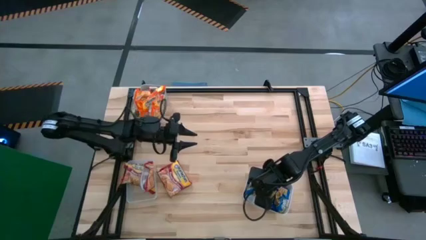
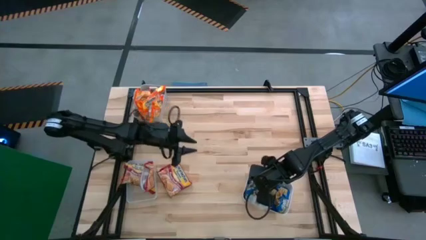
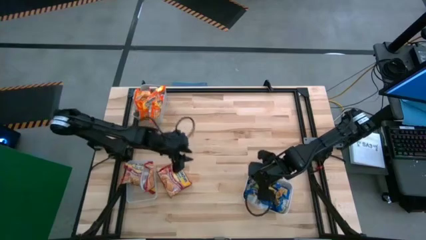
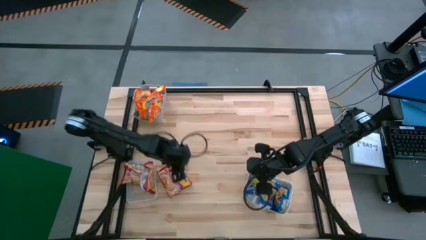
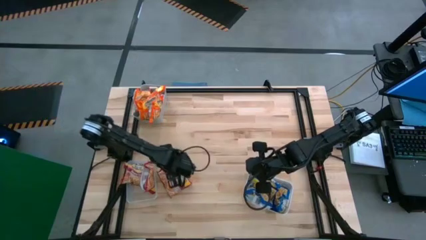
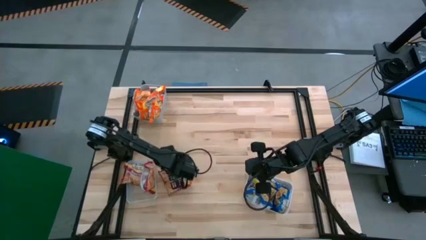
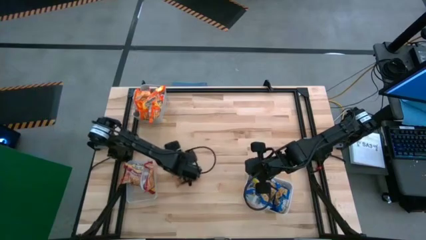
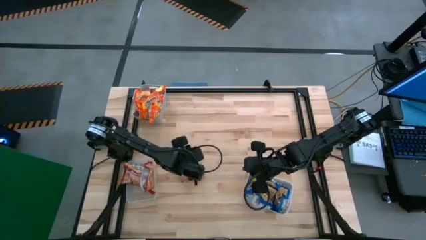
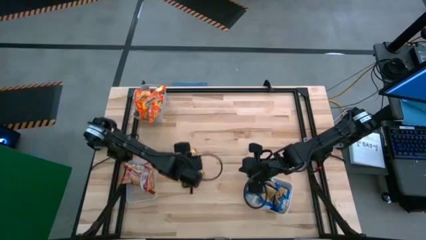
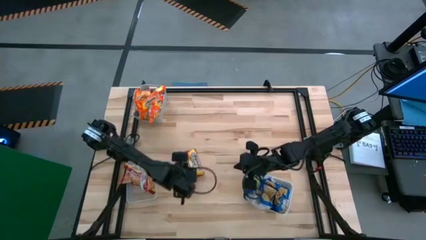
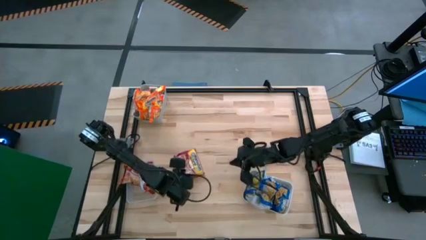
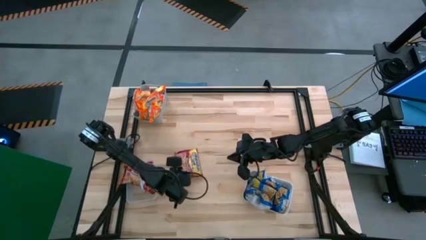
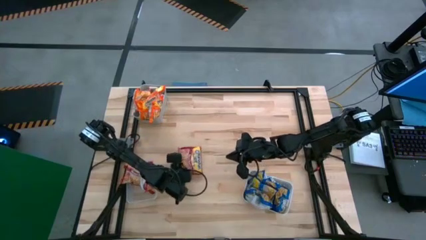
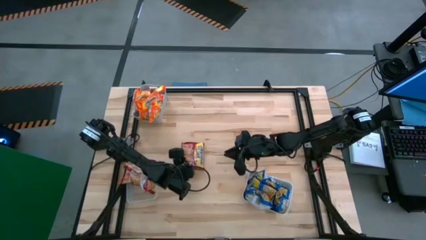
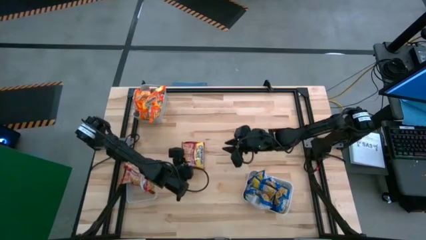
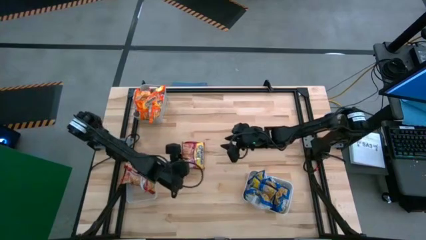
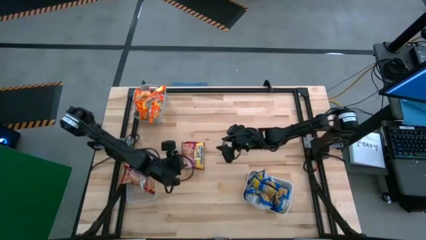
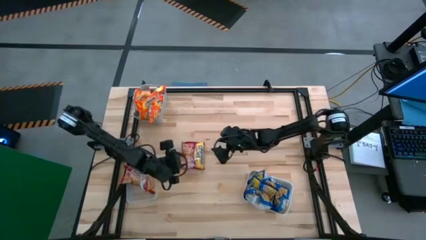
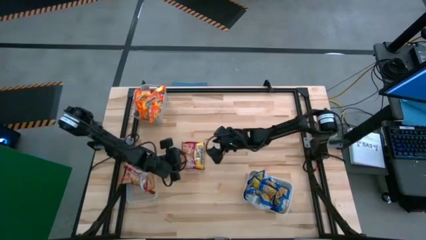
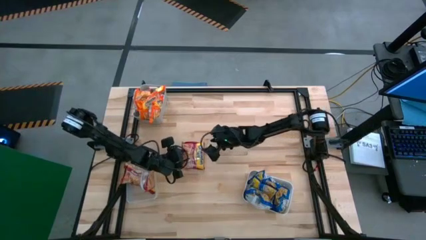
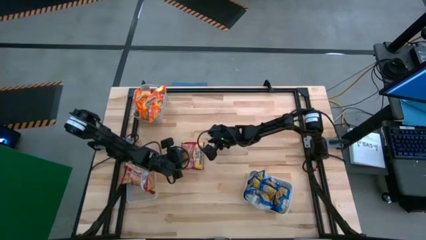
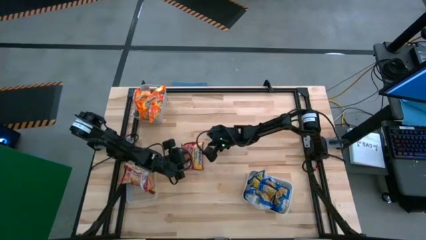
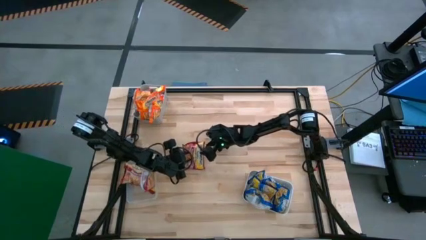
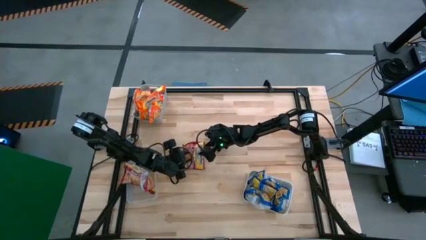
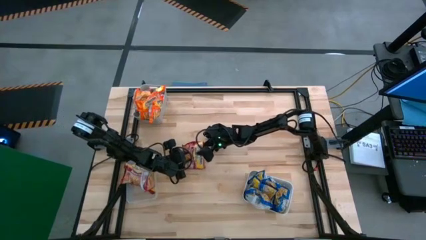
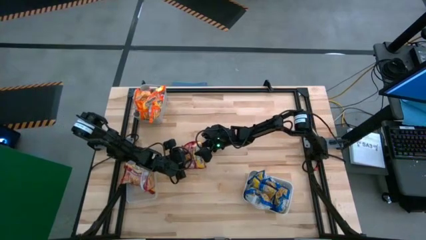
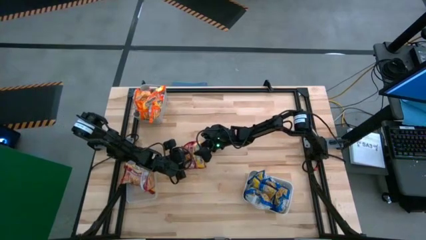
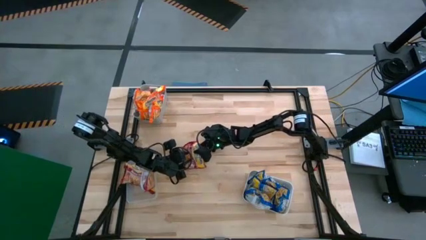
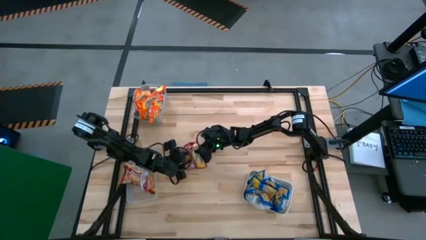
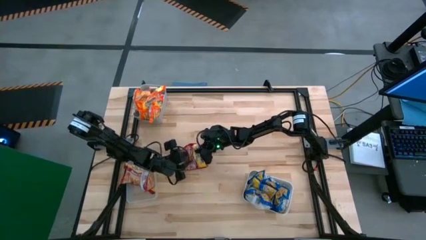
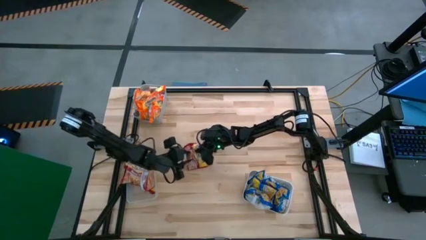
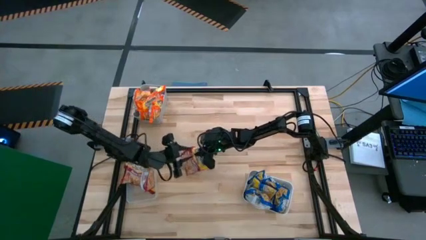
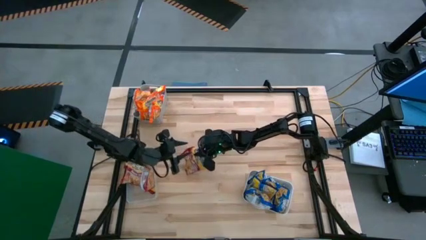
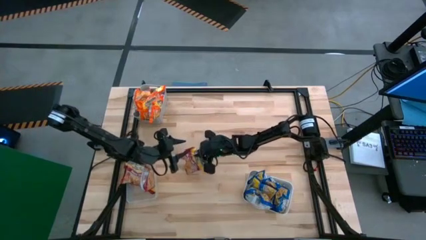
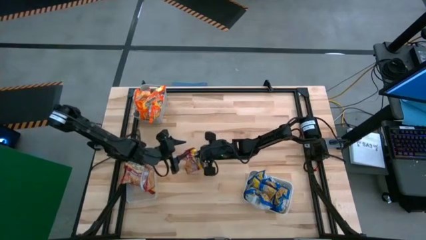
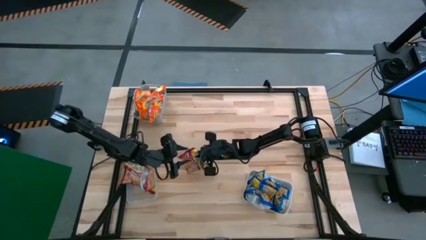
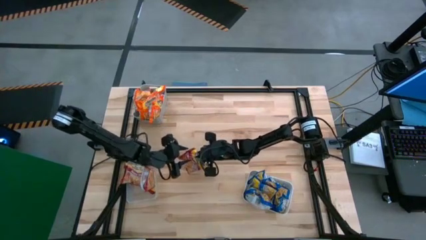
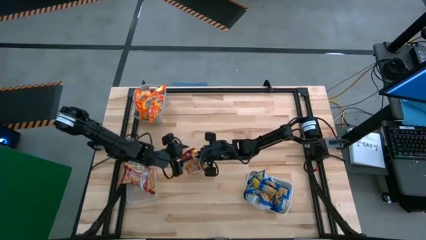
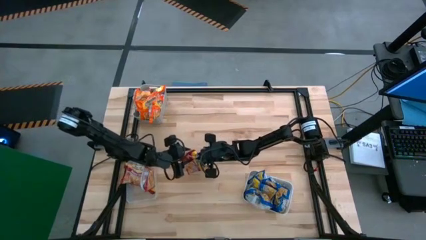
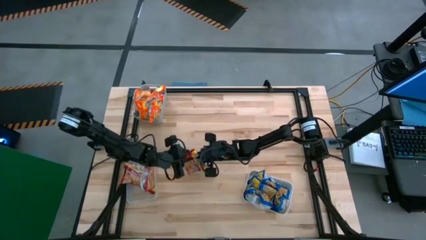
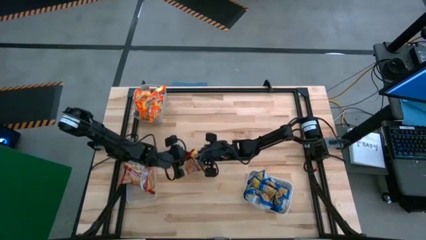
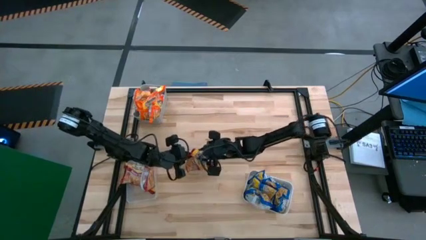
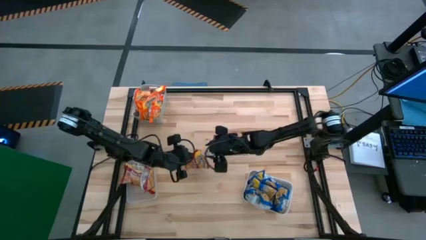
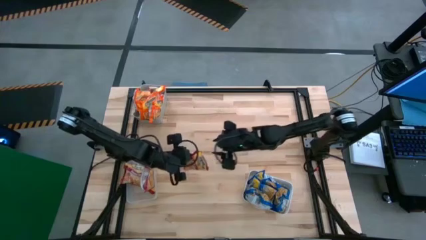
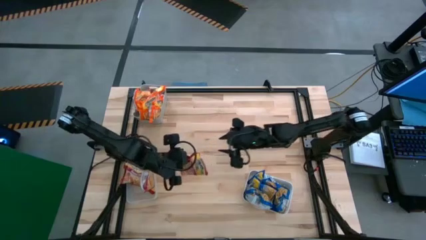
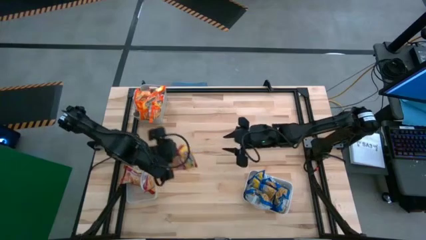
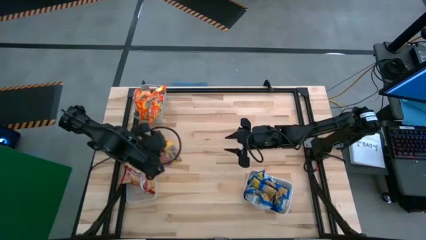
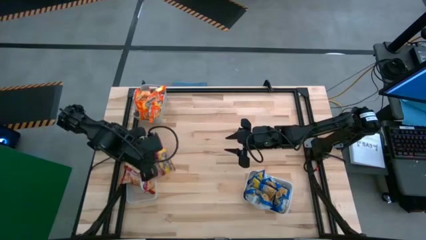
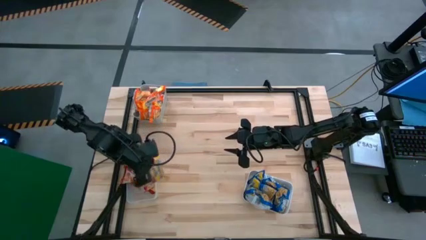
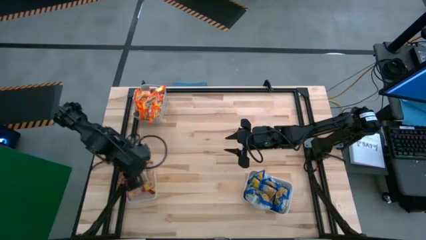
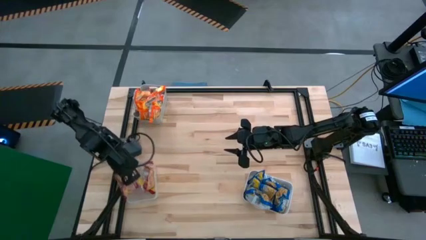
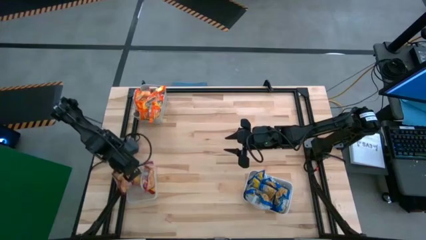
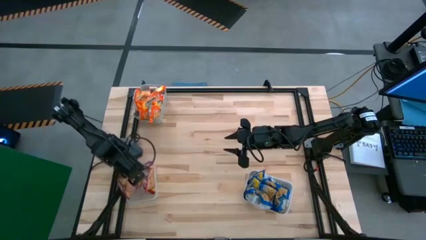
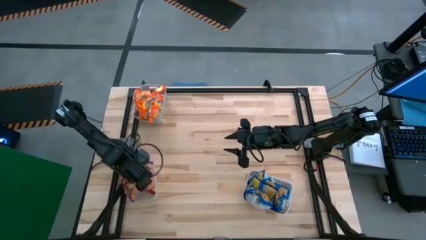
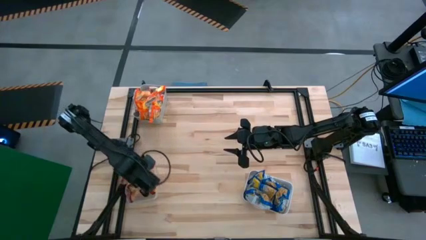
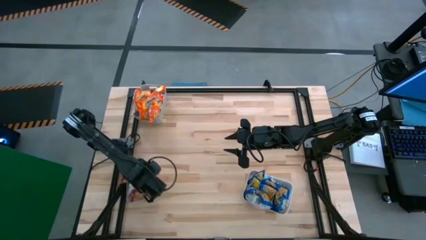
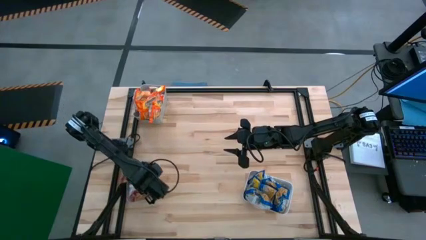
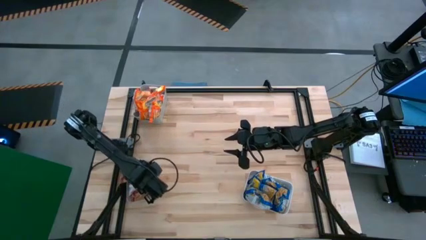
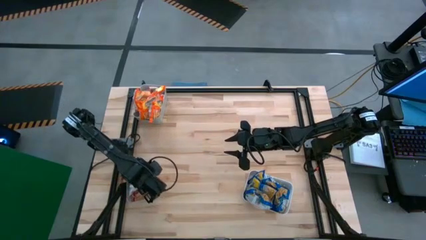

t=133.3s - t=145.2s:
Task: Sort Maruchan noodles
Put the red noodle pack into the transparent bin

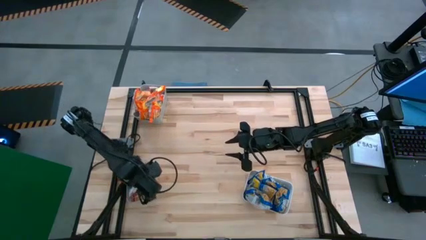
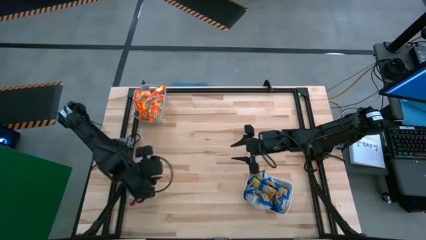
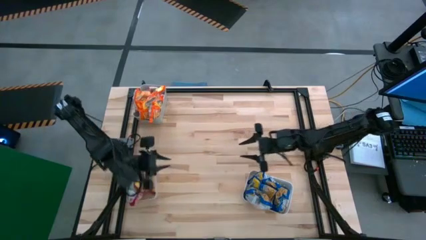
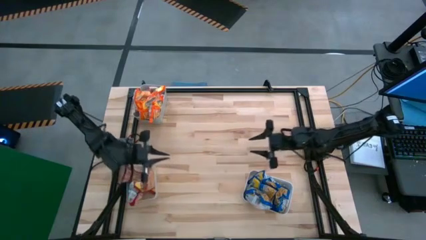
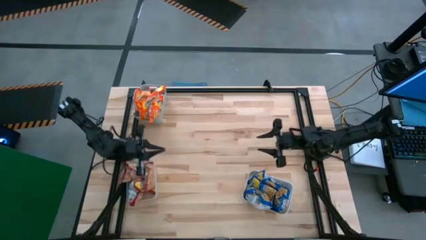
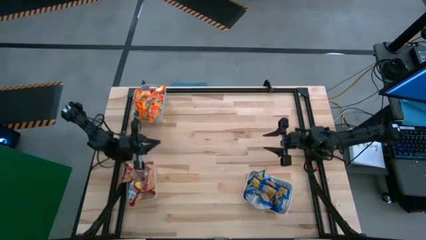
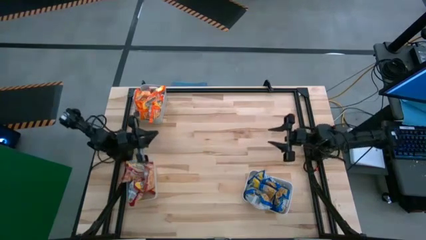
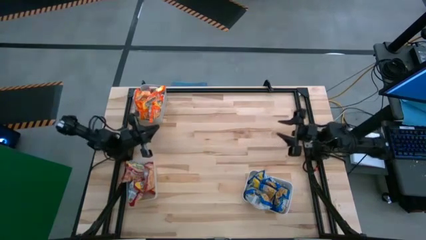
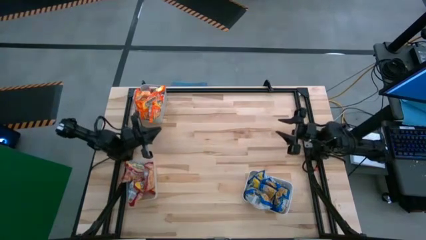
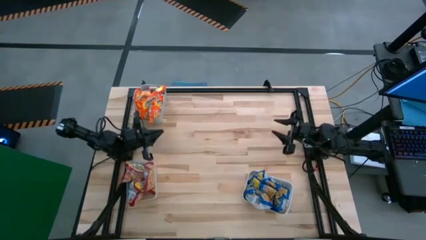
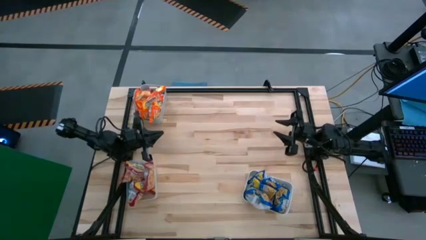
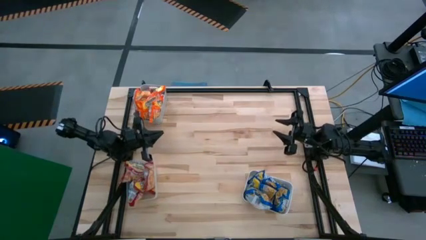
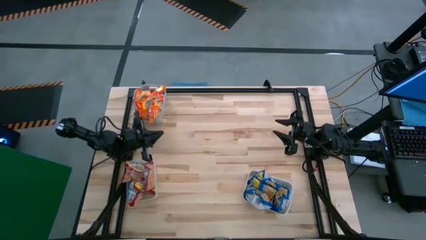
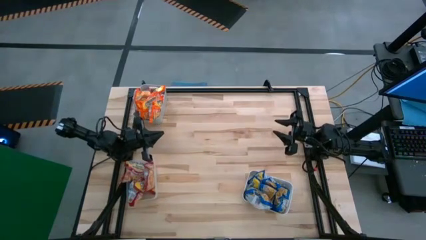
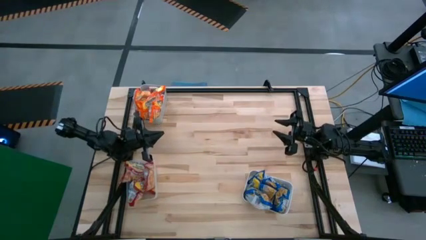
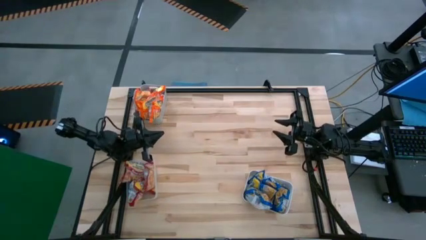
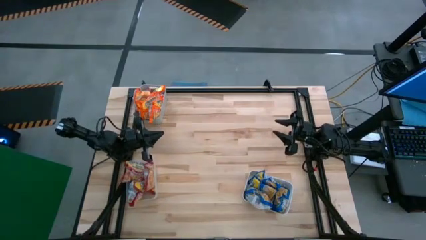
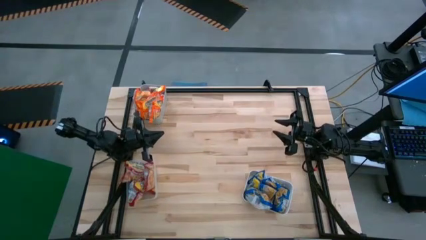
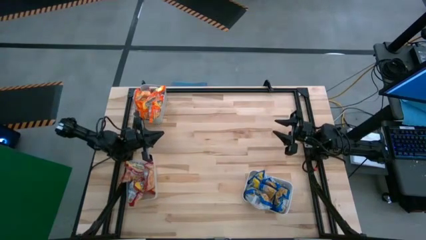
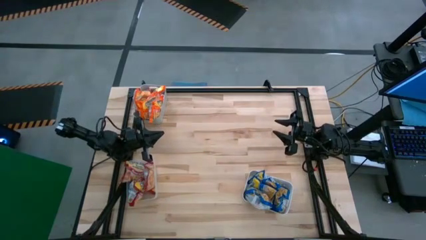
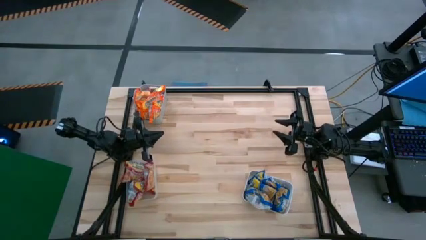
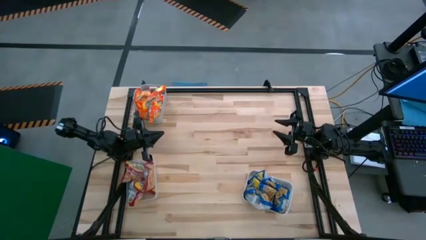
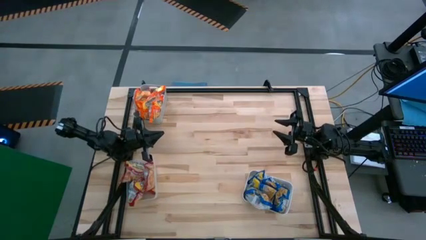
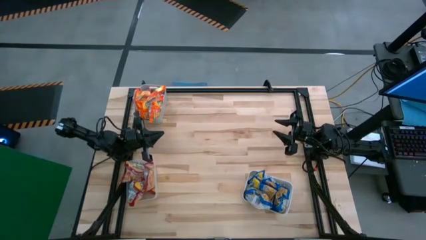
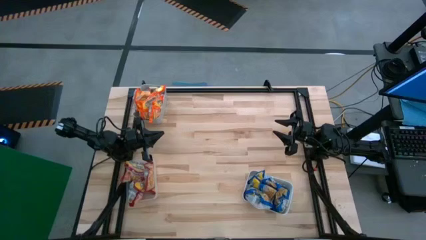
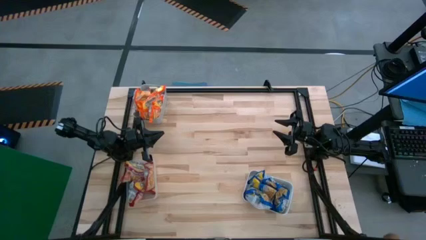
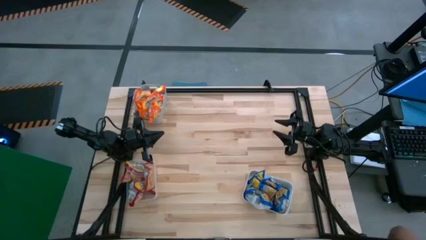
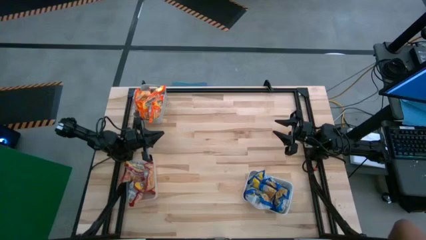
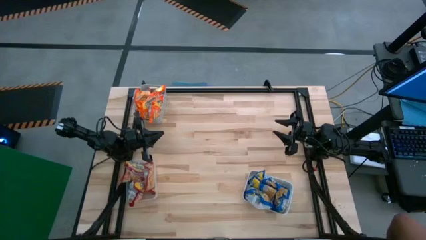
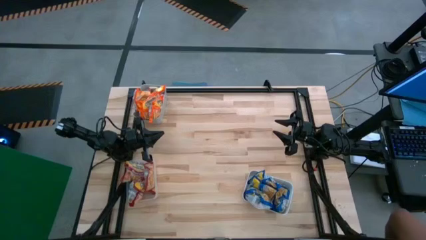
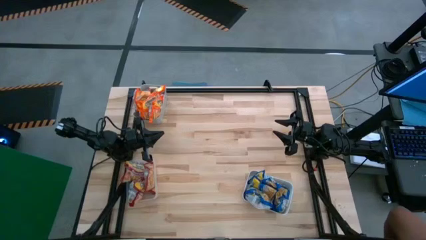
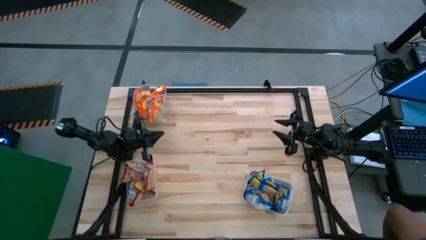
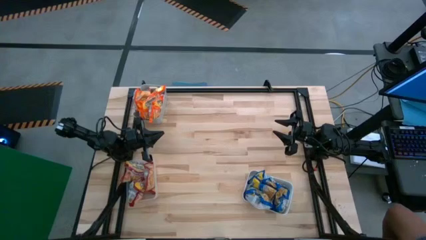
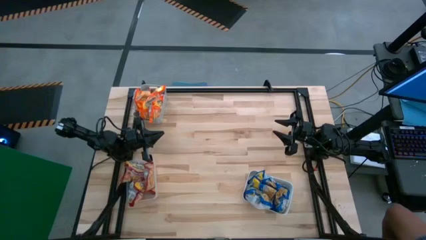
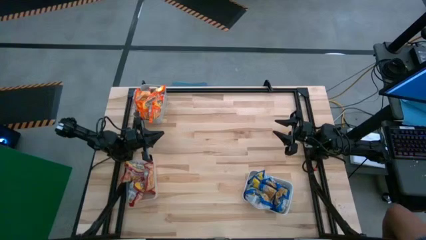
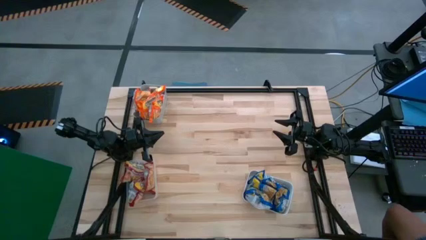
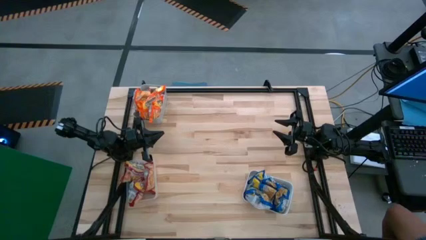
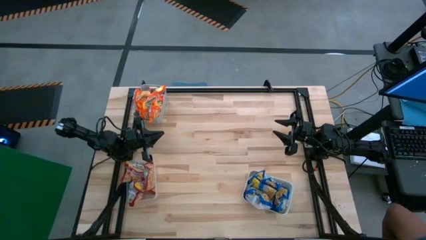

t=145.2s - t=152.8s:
Return to Home Position
